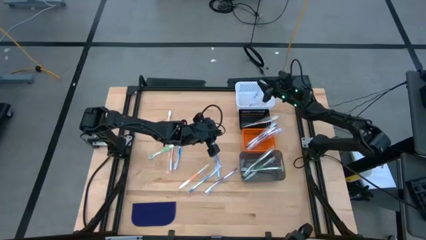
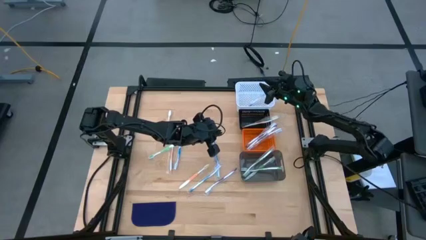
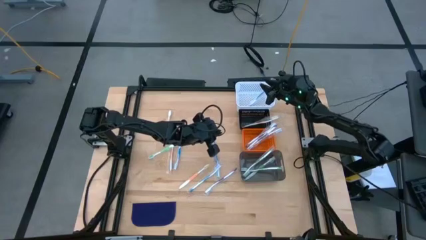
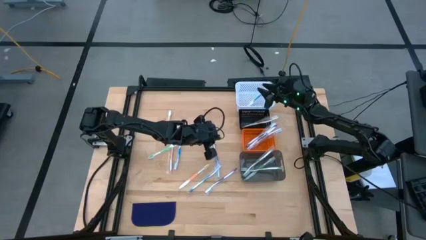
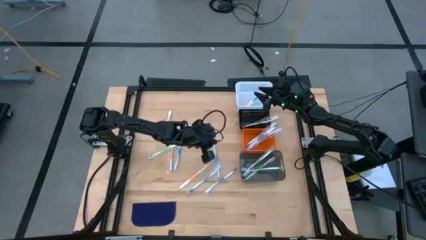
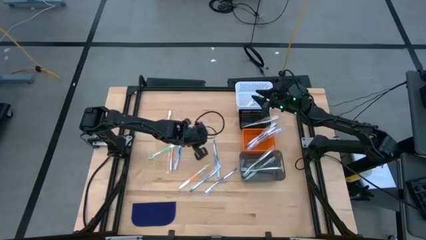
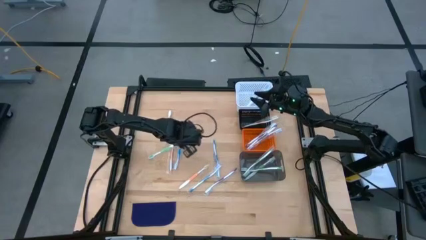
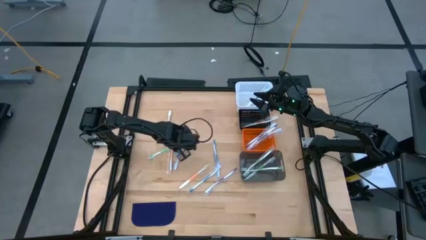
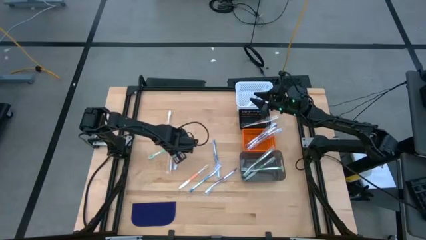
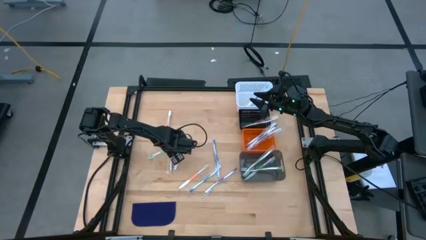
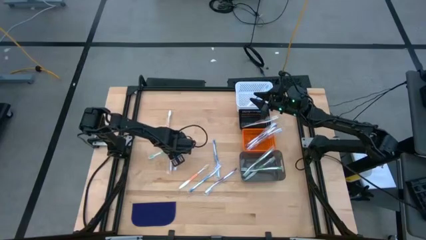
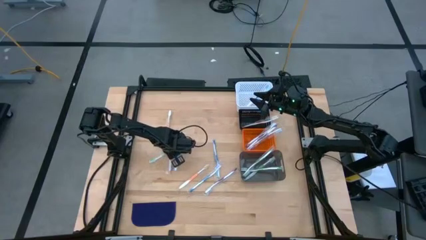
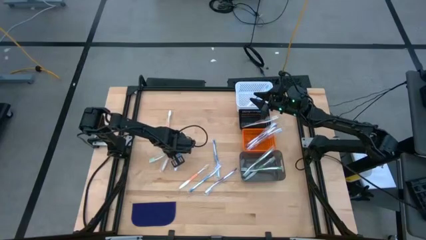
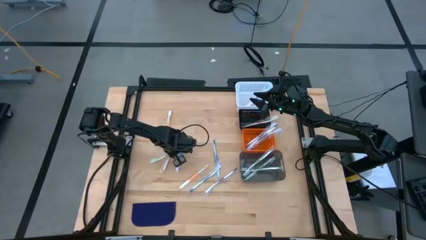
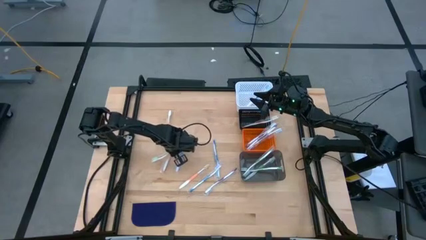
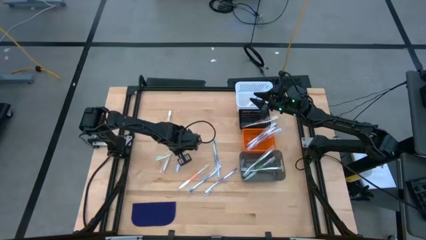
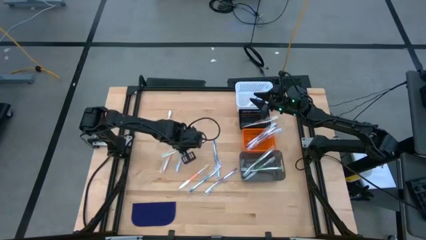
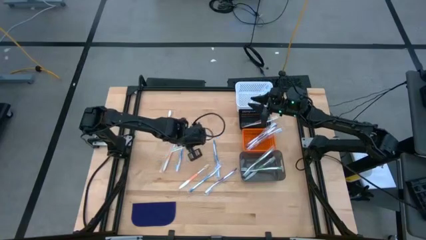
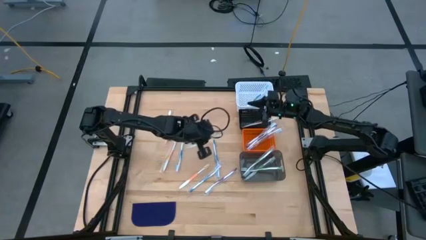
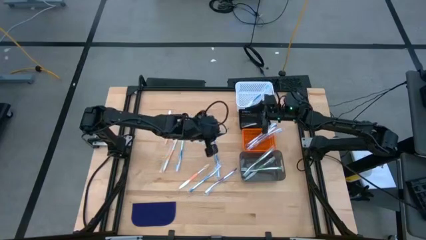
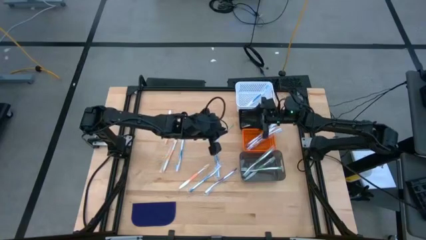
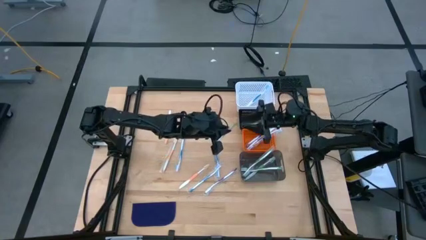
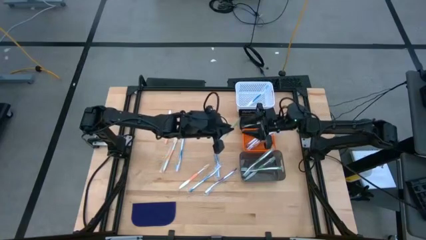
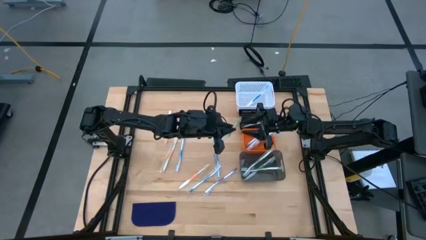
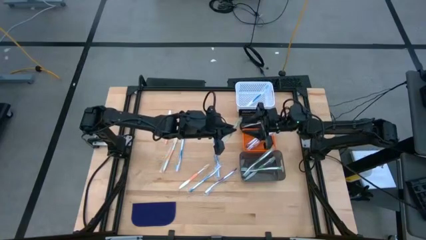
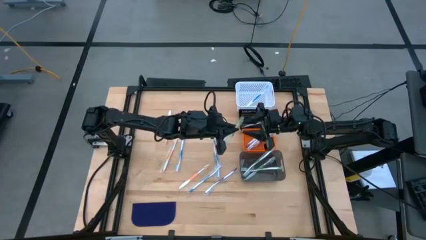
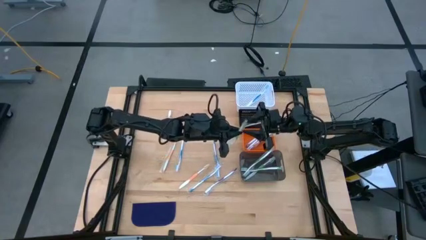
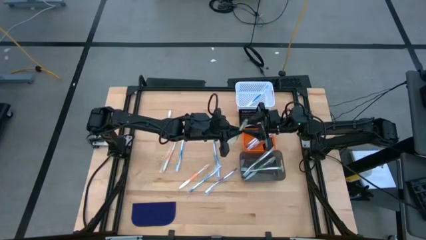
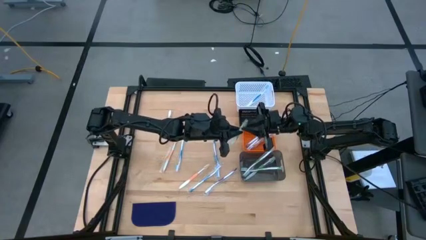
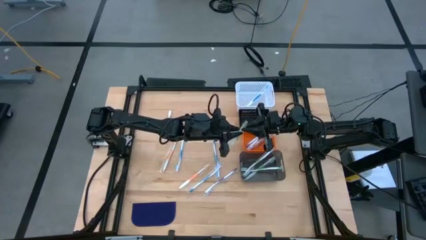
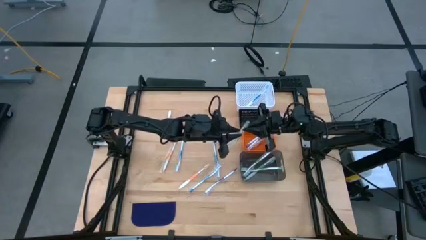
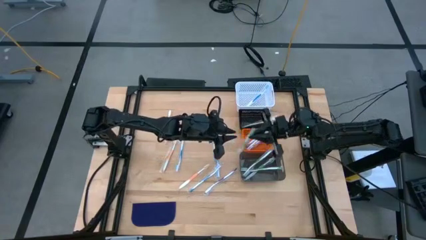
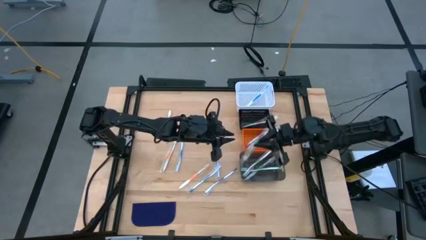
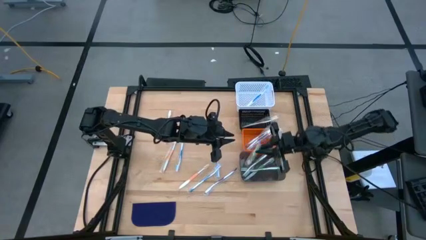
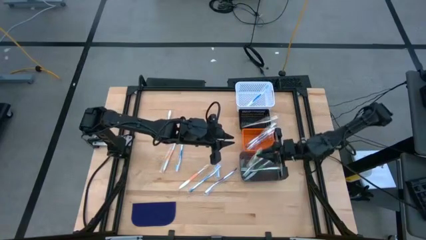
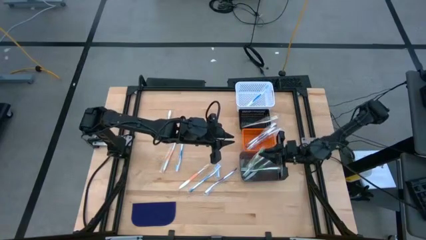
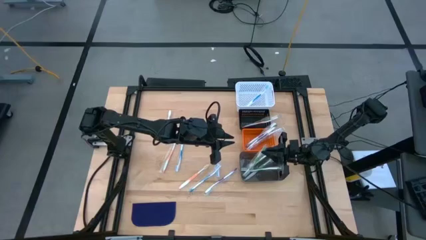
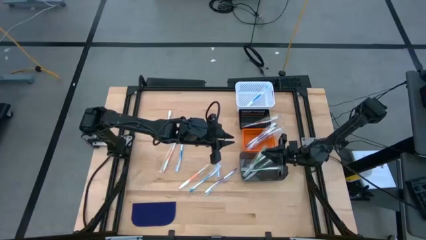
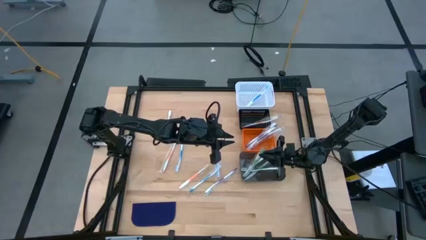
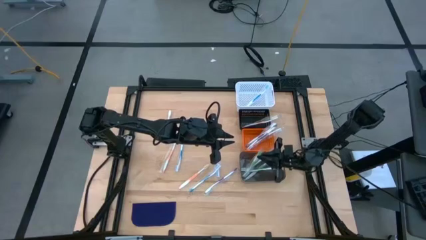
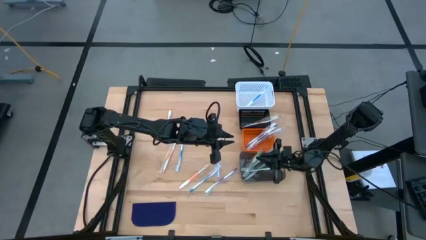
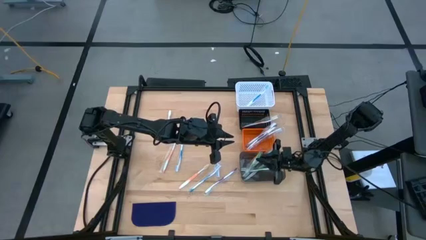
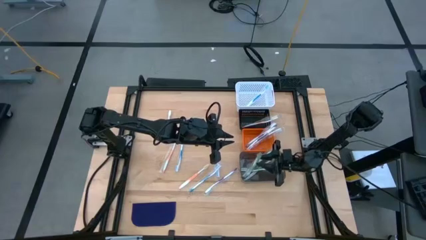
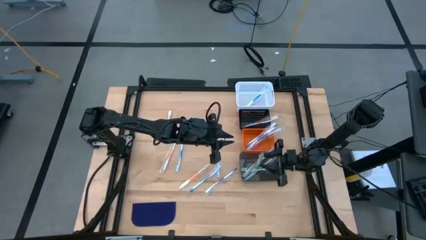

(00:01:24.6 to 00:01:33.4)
Task: Pick & Place Toothbrushes
Put the green toothbrush into the gray bin

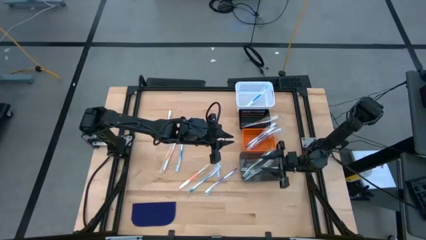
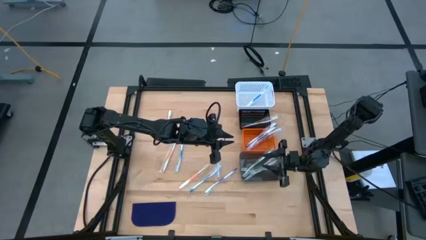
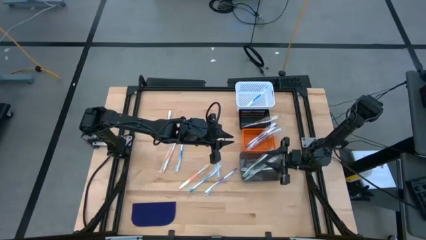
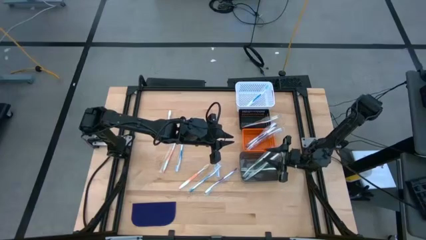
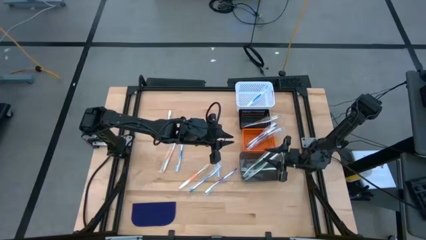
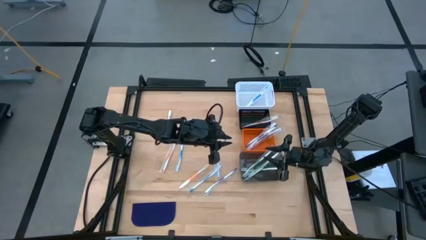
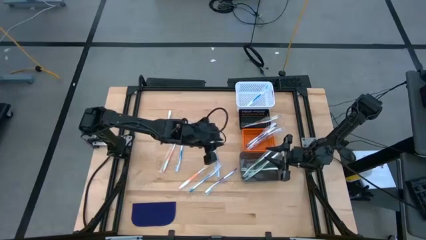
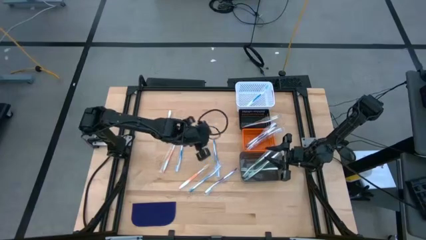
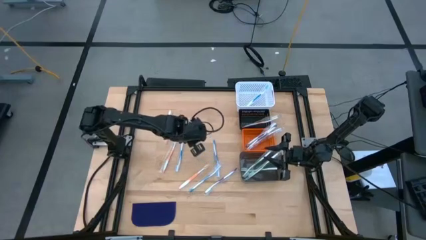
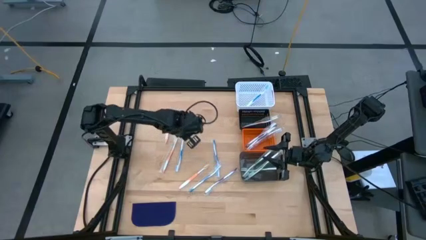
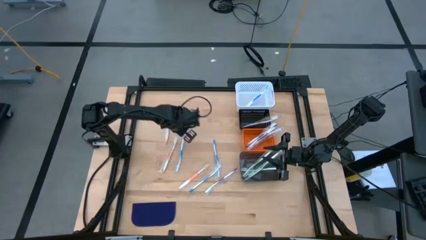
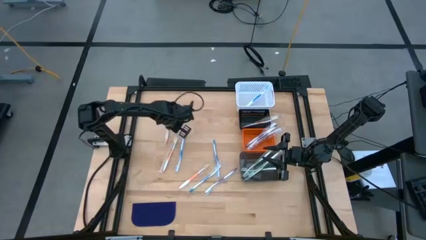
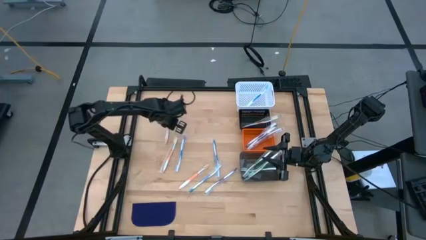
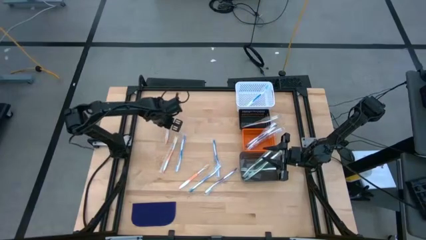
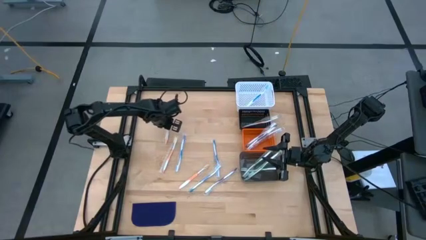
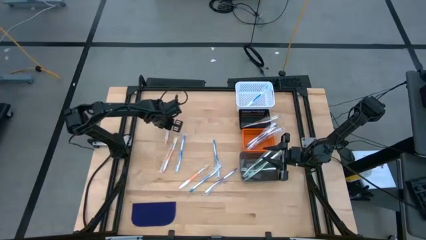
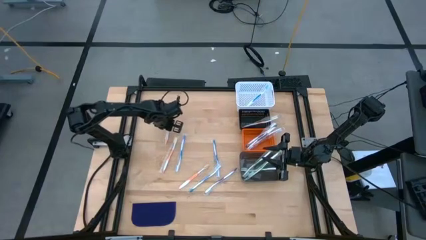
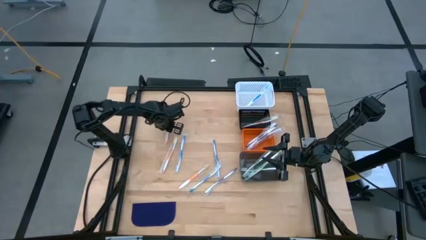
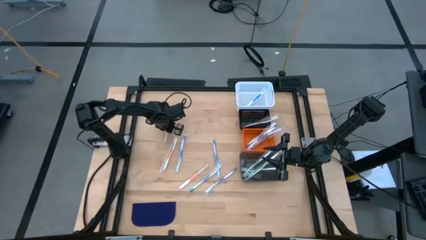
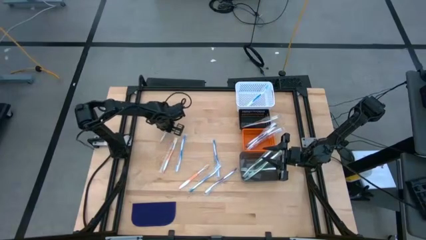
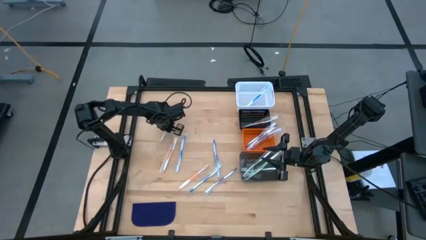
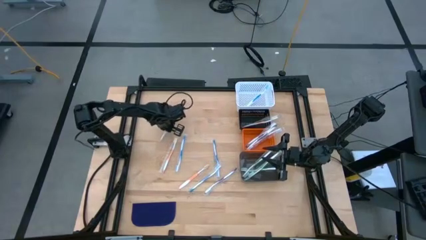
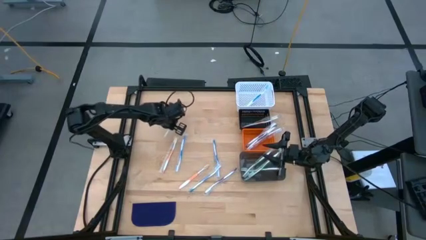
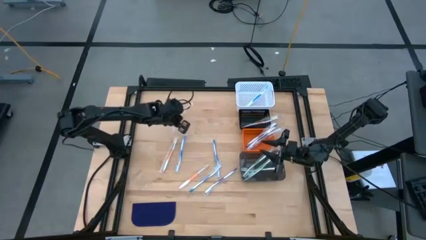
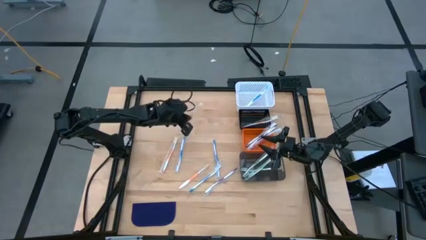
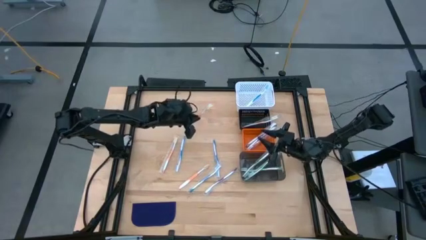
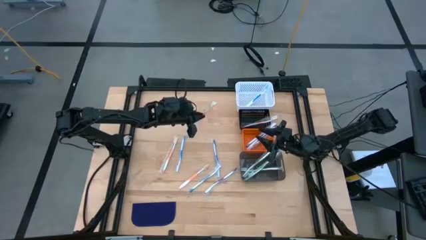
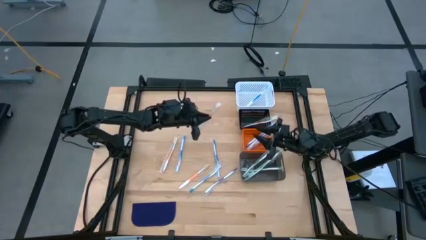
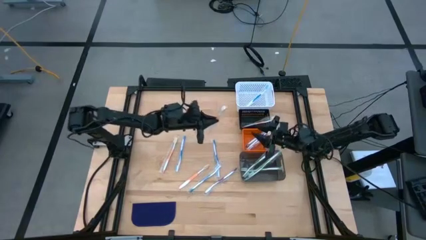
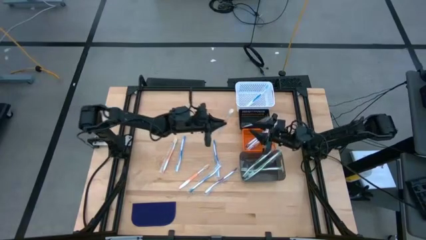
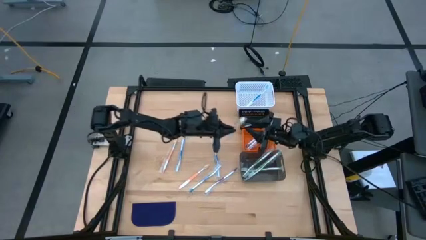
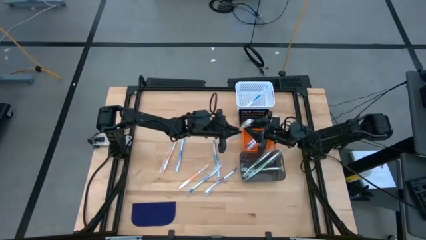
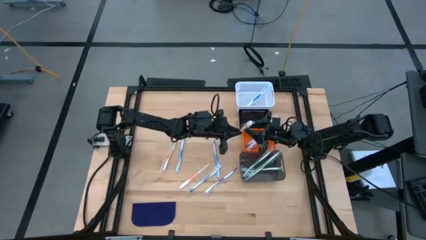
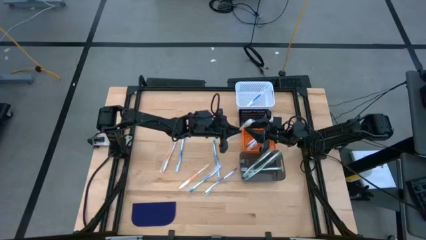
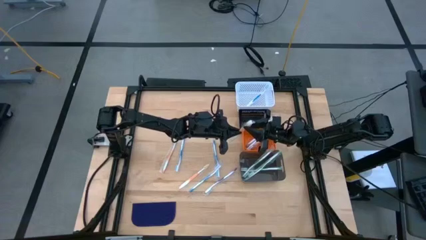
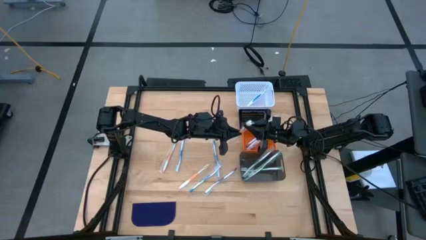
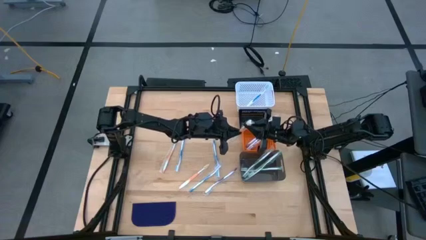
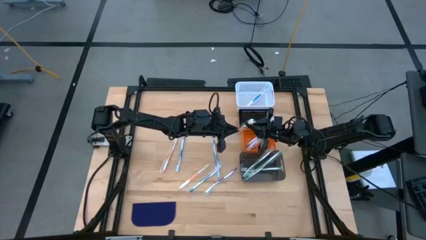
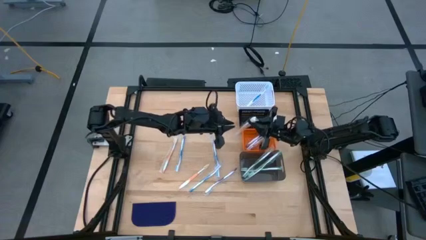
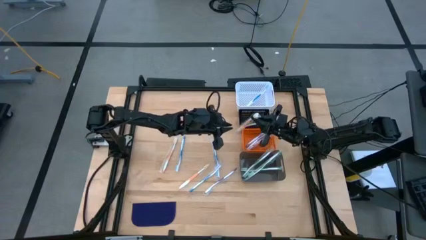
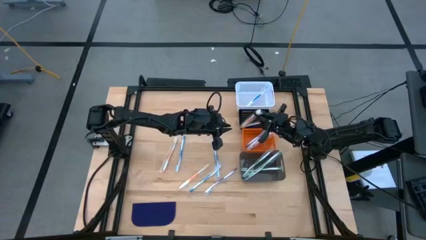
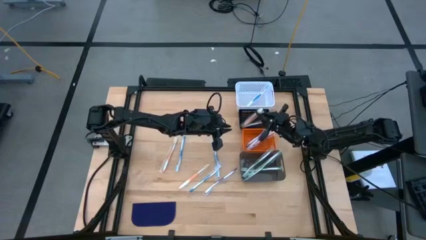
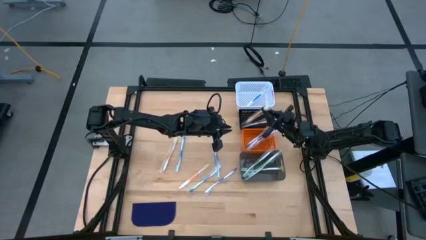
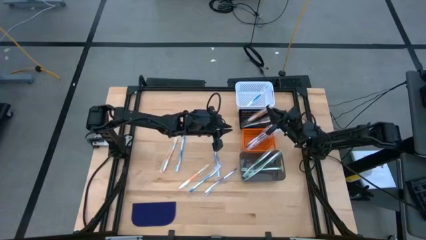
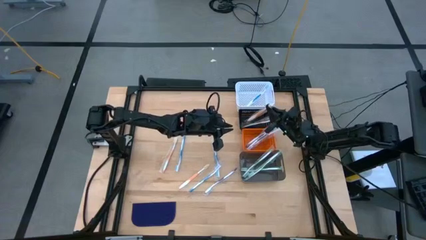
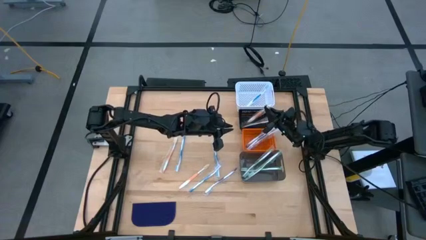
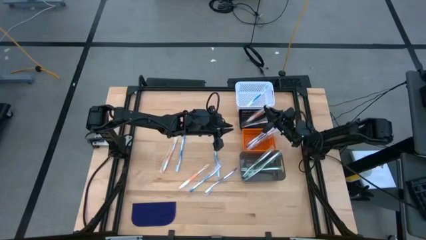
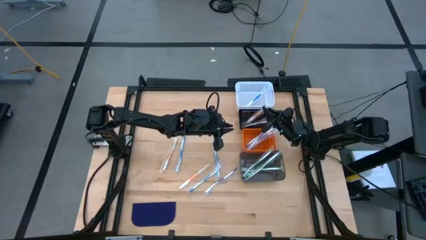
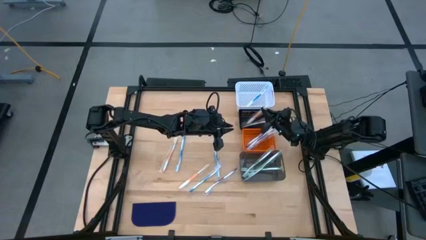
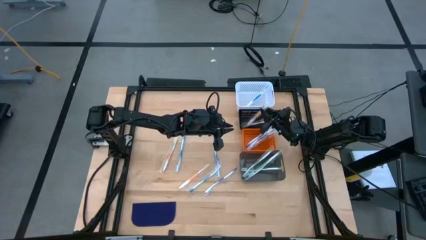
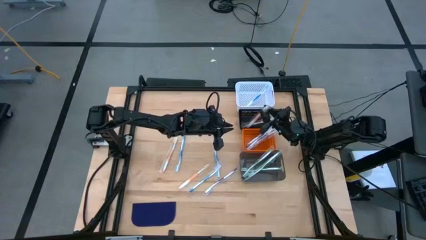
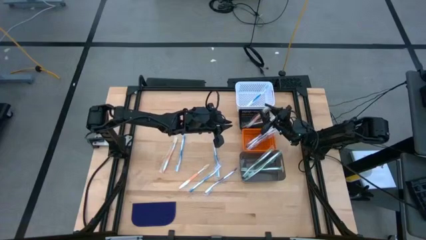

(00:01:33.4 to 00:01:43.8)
Put the orange toothbrush into the black bin
